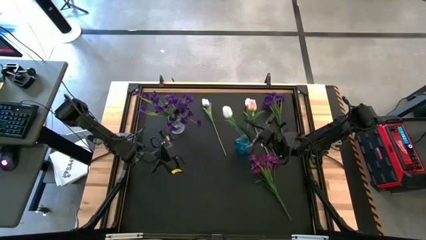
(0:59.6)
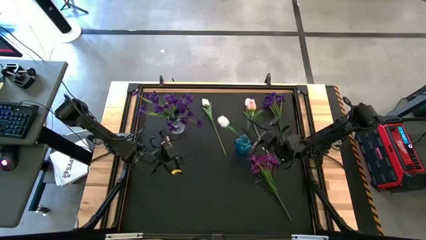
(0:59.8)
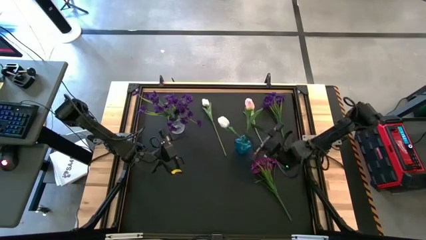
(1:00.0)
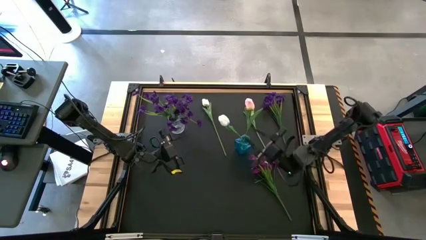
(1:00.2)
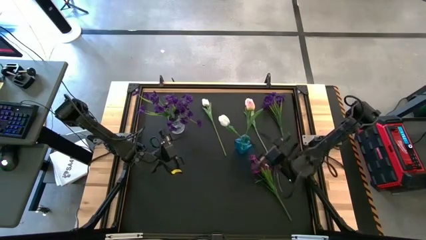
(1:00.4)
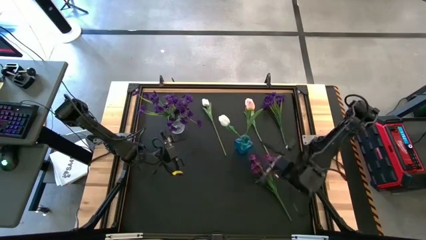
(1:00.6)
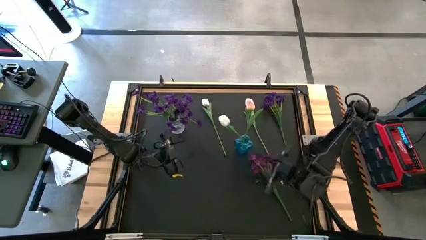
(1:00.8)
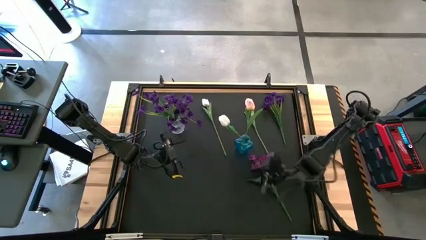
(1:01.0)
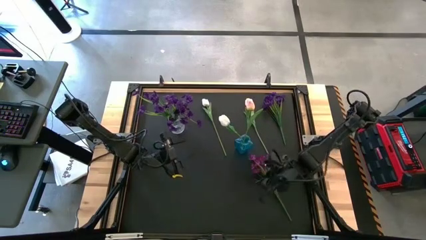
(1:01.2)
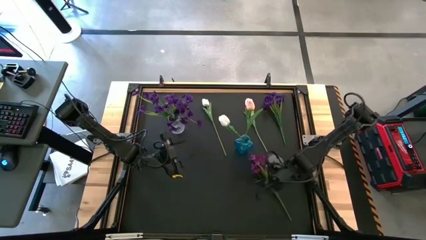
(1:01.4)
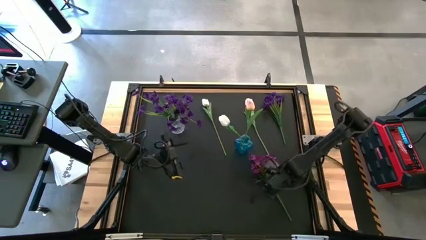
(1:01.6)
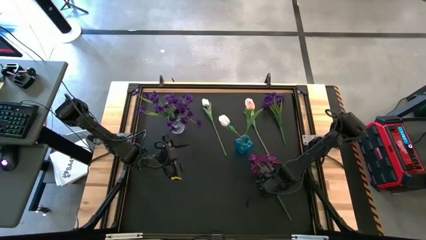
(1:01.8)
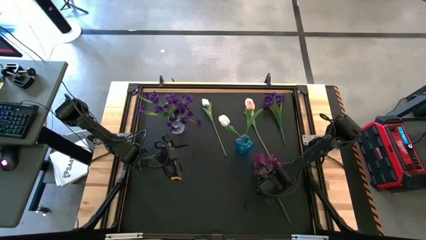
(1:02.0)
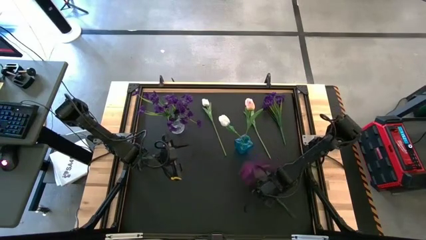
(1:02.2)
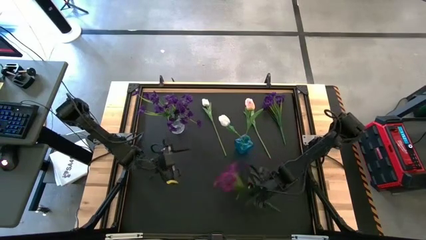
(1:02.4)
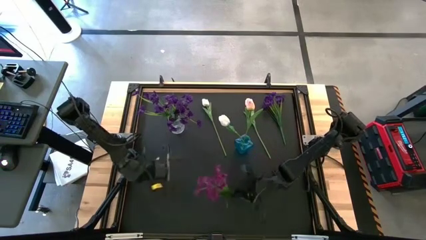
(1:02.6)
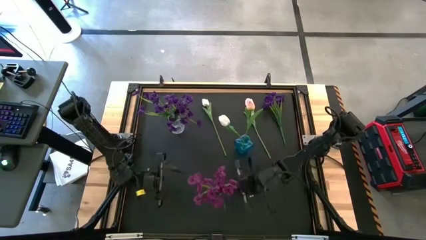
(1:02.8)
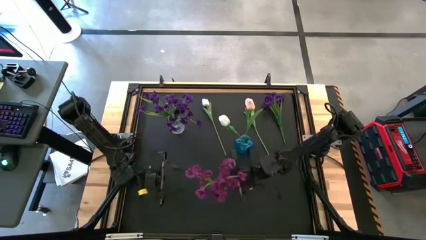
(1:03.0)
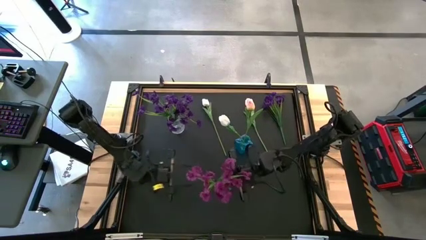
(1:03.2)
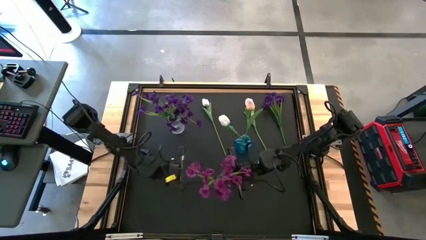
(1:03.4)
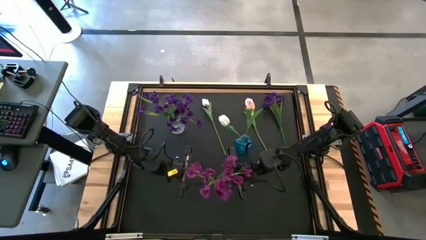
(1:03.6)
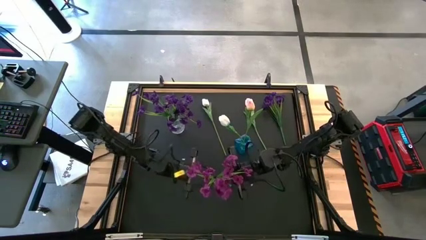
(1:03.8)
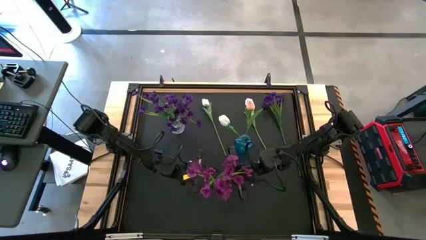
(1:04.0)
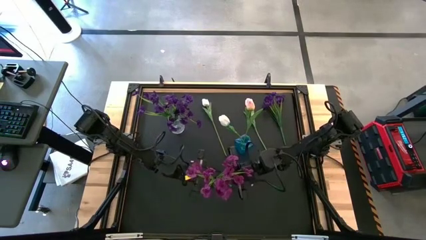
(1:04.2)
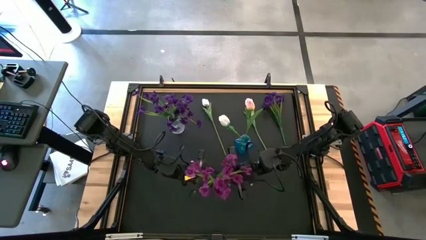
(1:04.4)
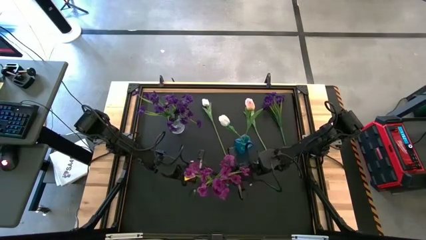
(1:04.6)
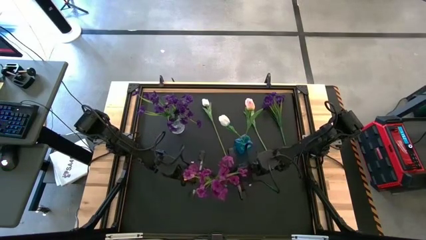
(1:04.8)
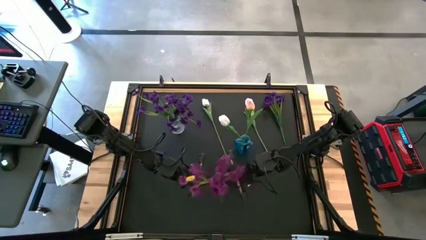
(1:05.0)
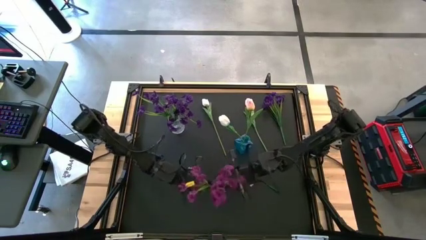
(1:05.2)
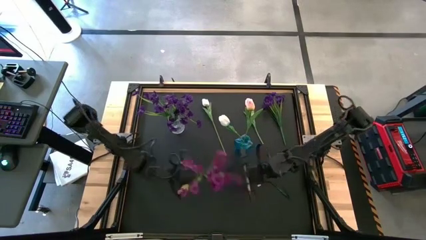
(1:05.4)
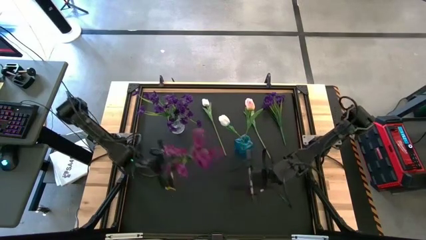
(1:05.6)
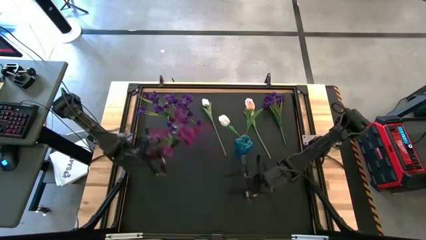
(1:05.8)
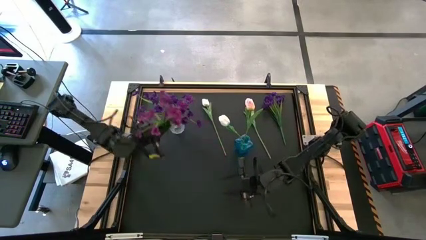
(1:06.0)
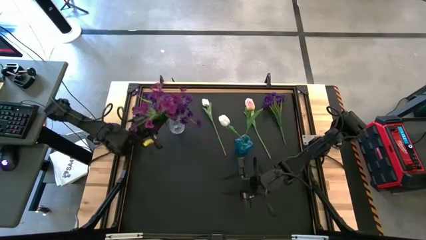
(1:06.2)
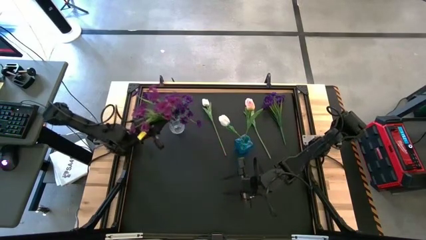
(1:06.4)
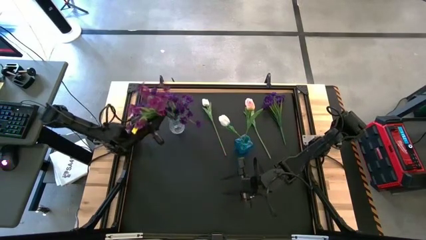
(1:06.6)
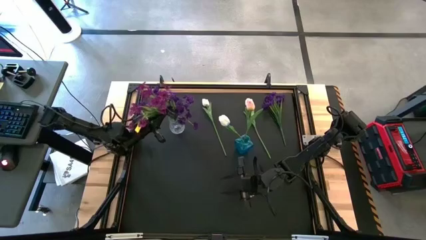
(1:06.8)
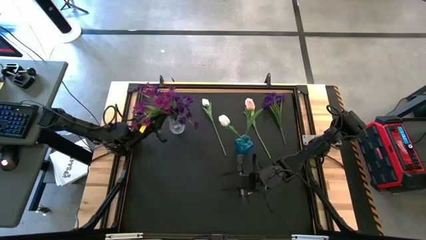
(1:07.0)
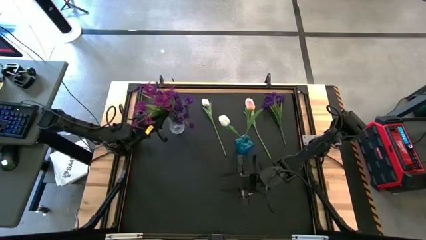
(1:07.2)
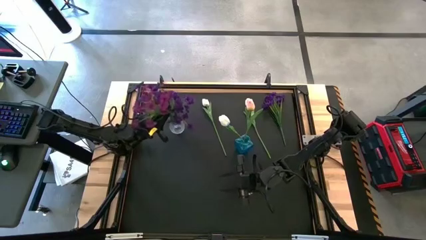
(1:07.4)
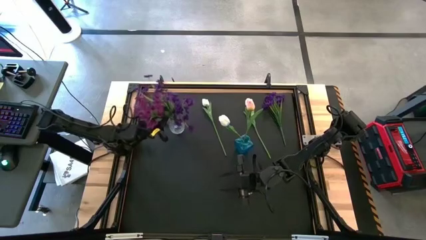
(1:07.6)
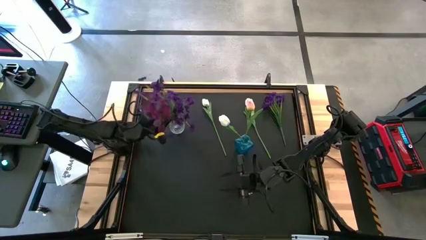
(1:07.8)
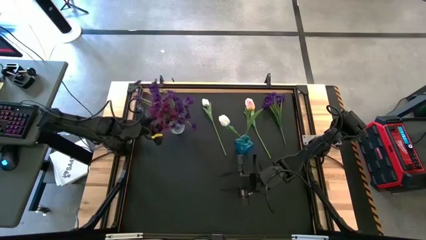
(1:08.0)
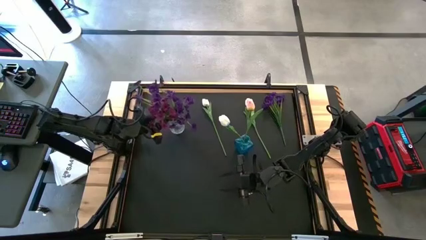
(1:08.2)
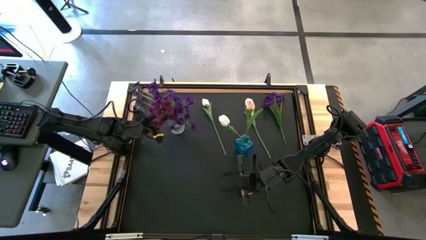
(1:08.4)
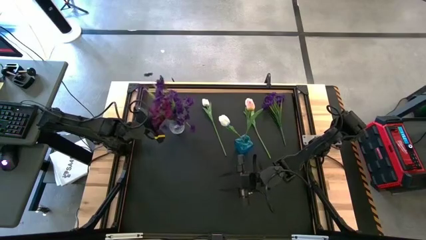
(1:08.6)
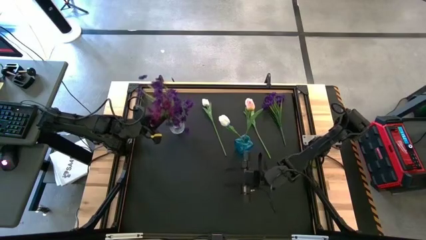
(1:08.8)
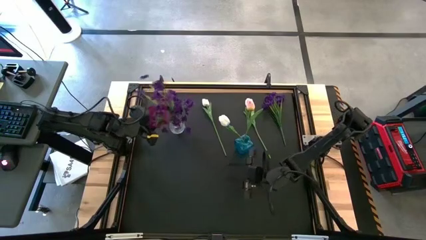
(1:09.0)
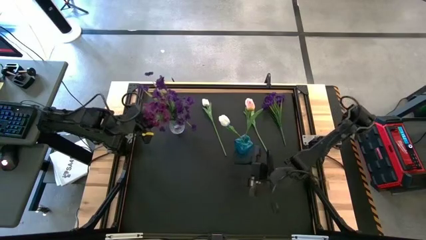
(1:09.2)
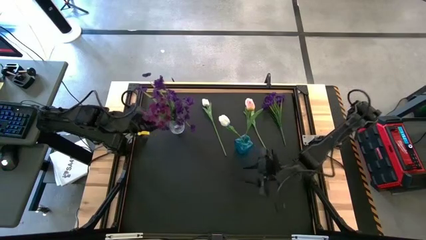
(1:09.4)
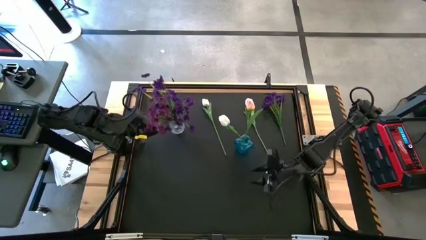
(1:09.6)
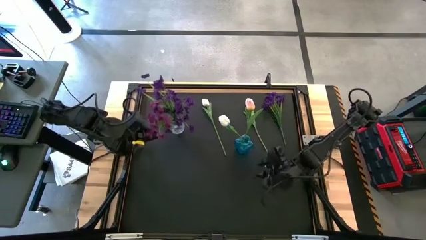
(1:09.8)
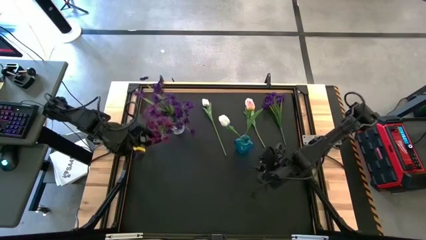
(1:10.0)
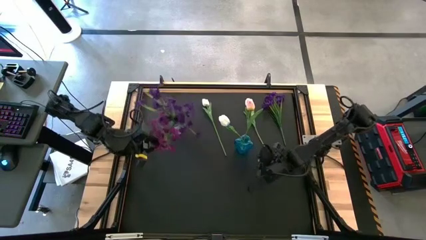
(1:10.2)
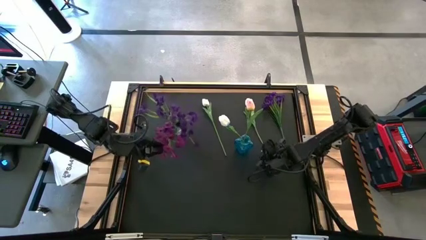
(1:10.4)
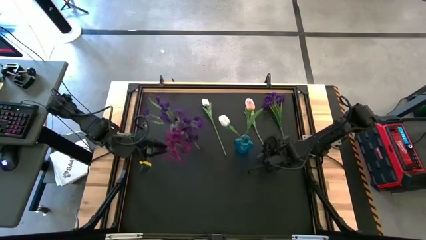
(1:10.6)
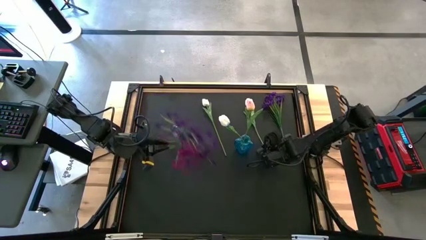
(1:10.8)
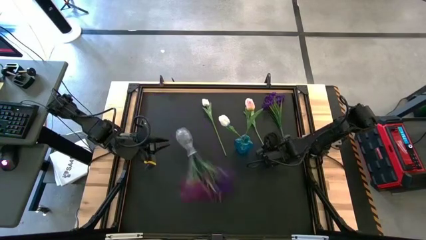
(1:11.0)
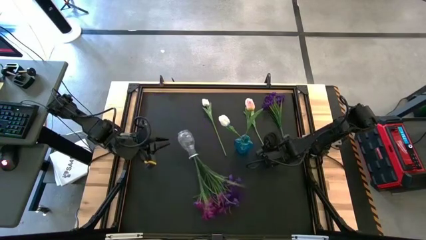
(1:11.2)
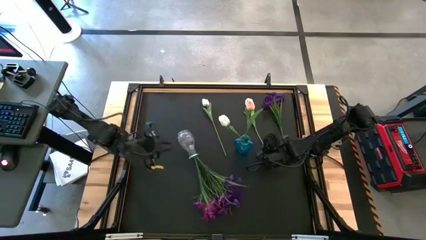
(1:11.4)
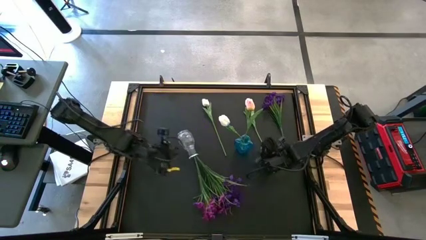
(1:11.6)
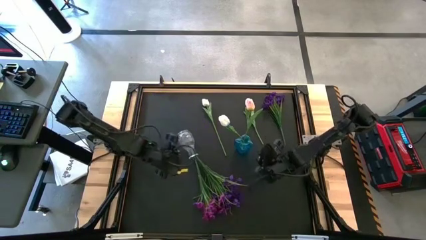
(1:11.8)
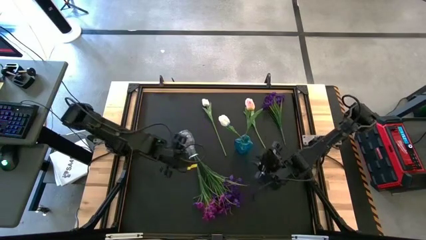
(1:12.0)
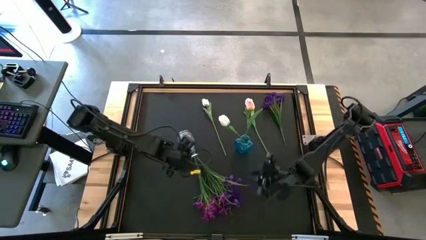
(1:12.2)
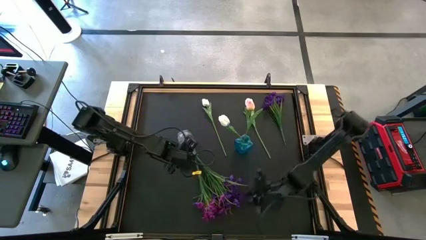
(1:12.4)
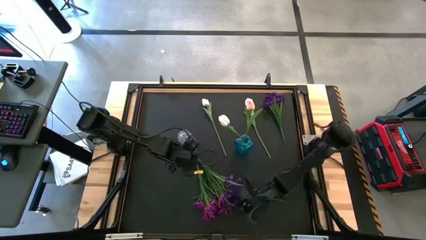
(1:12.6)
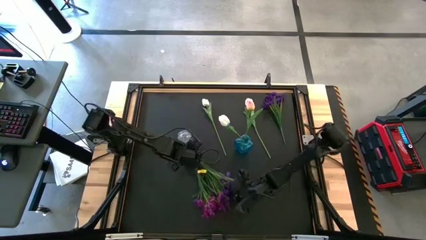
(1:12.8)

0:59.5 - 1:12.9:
Task: Sort flowers into vase by color
Put the pink flowers into the transparent vase

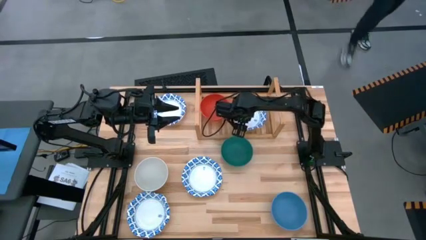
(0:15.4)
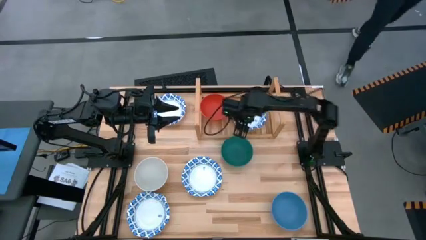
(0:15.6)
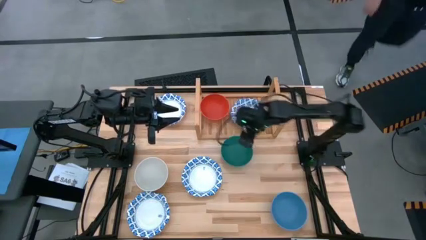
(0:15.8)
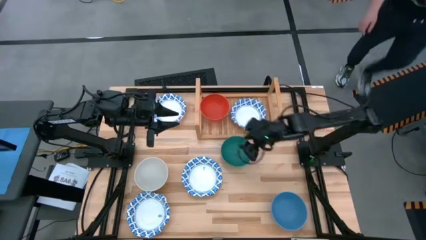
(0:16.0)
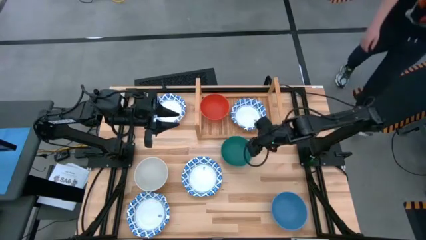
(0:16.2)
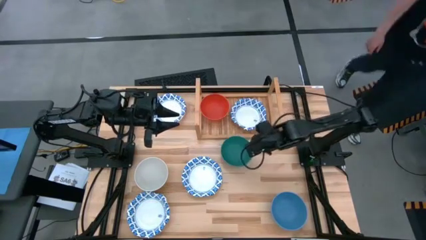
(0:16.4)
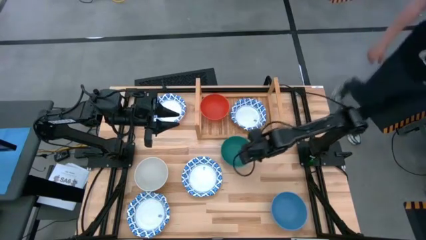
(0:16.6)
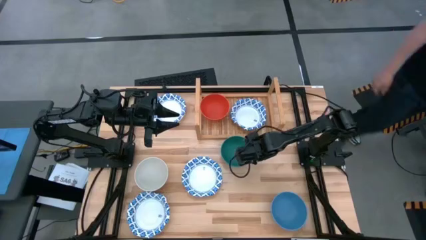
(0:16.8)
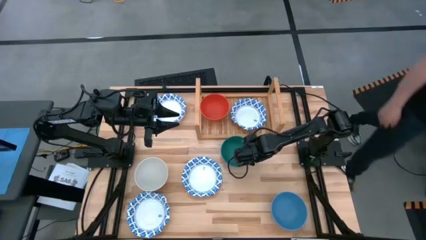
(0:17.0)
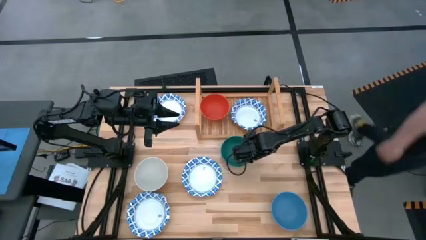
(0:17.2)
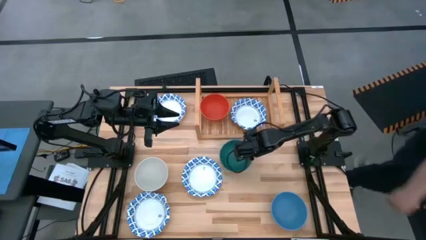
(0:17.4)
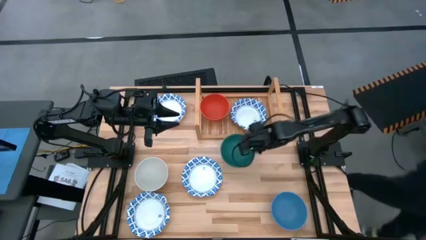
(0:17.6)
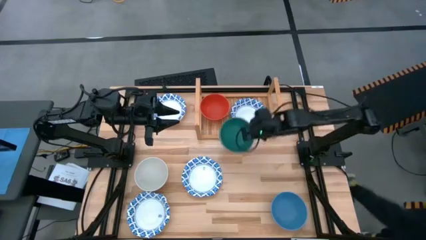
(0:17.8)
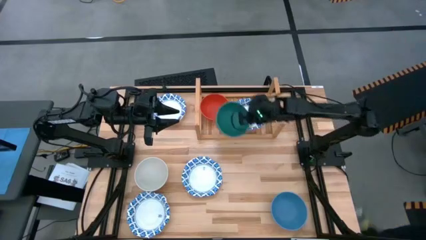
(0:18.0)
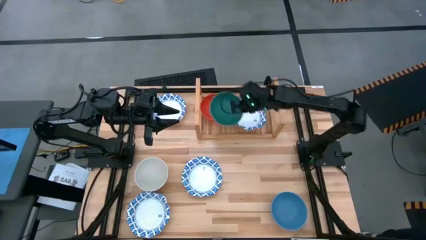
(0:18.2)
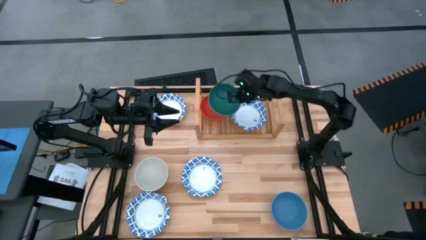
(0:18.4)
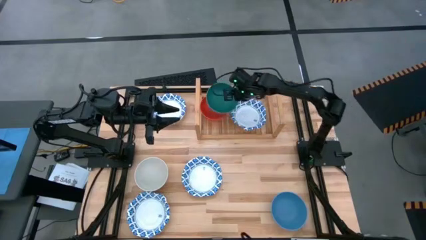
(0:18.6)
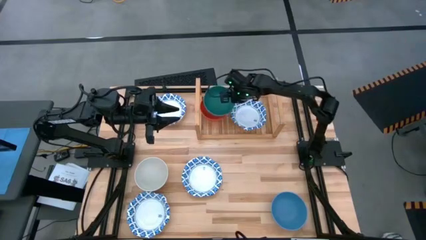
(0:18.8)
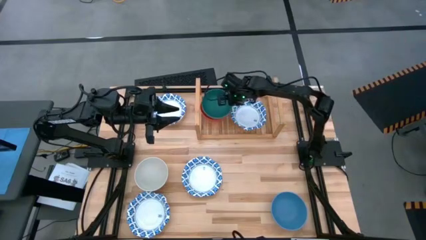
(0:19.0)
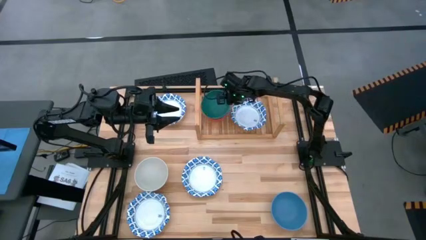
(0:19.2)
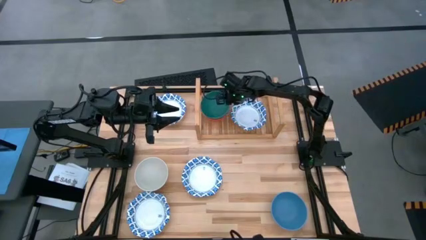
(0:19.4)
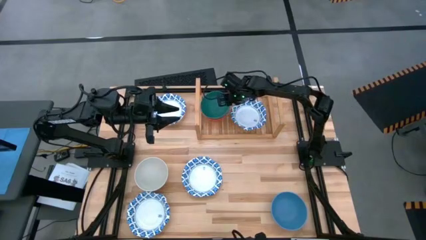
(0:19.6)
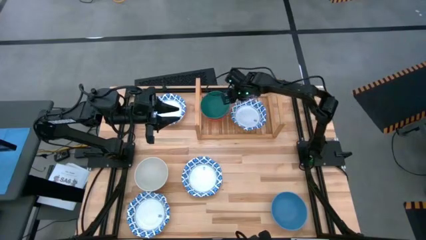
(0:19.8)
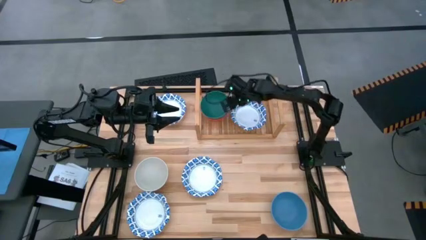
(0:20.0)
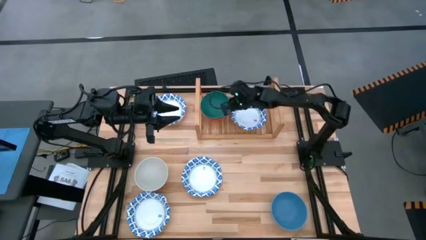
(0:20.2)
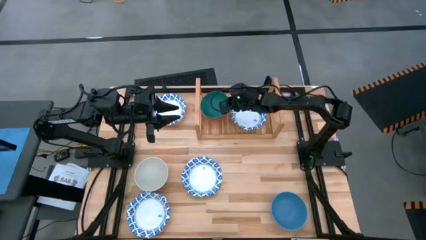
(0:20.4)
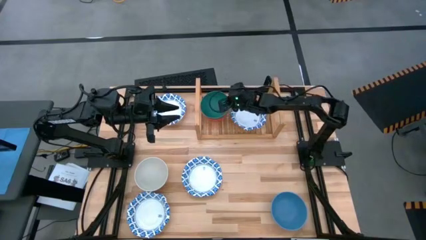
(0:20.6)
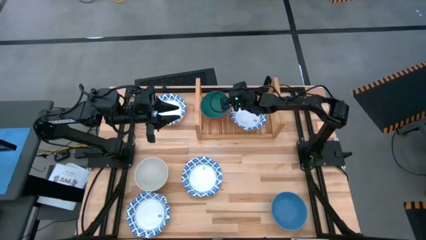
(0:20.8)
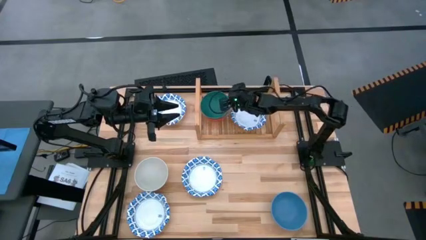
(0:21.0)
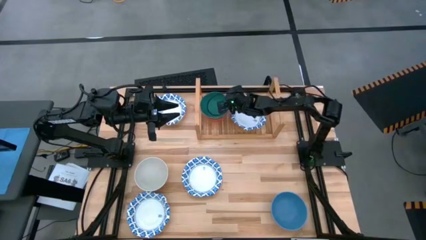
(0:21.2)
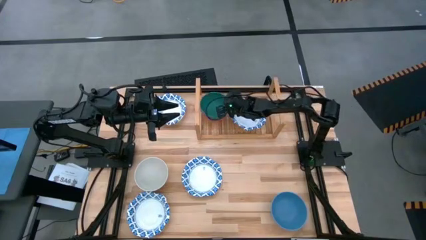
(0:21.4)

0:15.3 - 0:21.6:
Task: Place and stack bowls onto a shelf
Stack the green bowl on top of the orange bowl on the shelf
